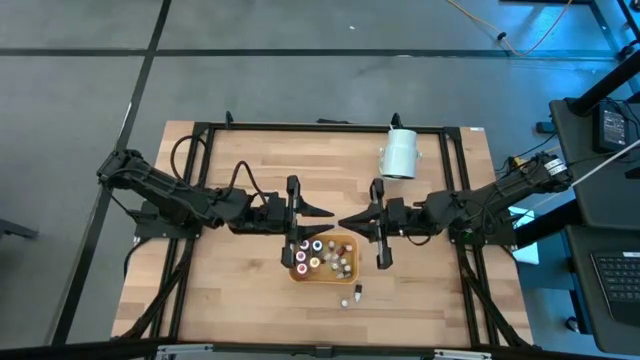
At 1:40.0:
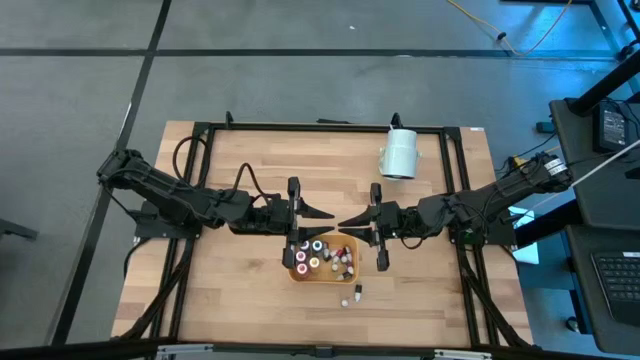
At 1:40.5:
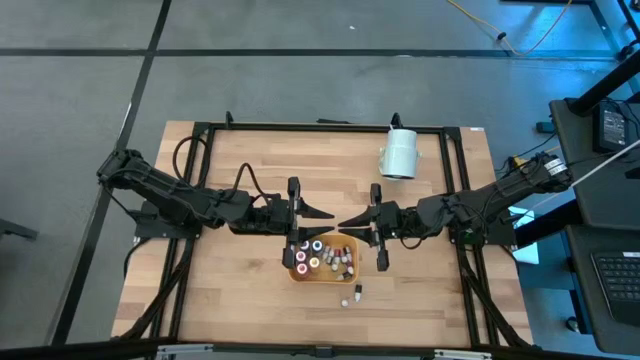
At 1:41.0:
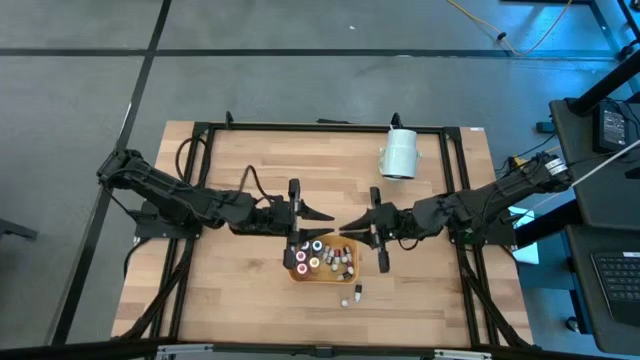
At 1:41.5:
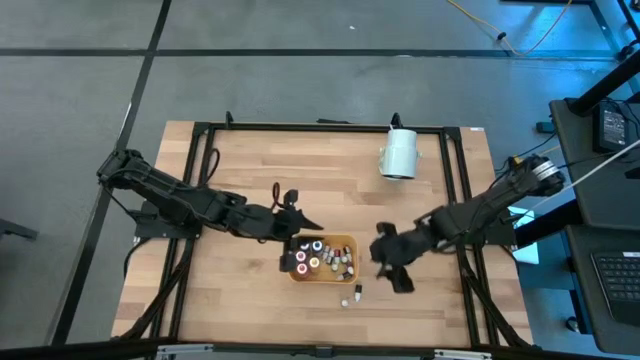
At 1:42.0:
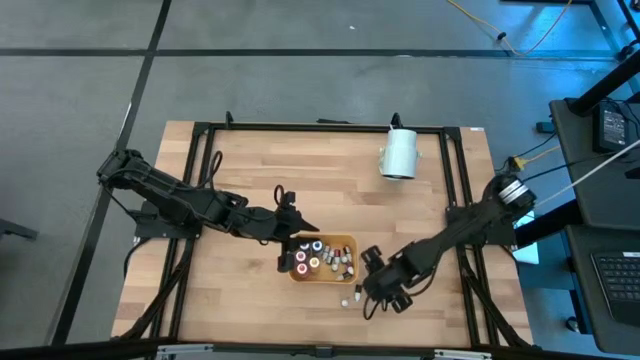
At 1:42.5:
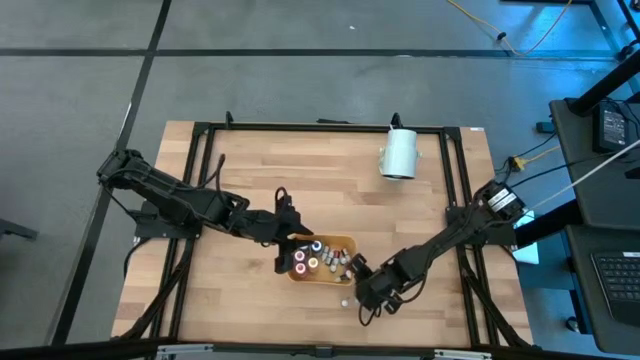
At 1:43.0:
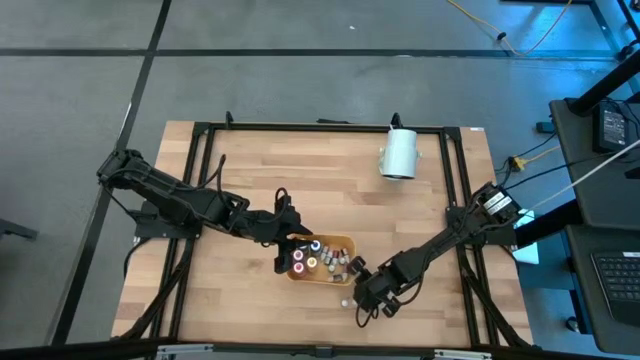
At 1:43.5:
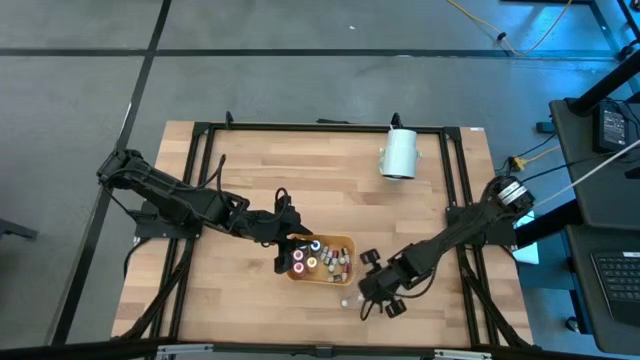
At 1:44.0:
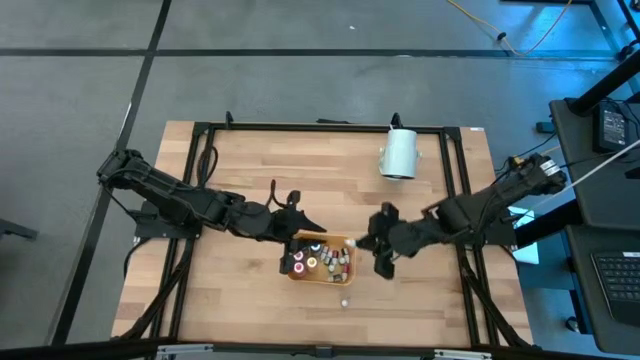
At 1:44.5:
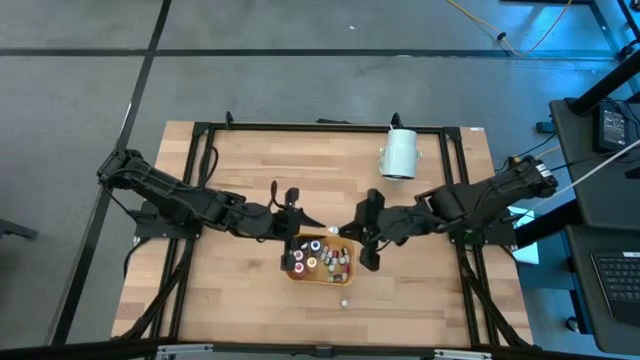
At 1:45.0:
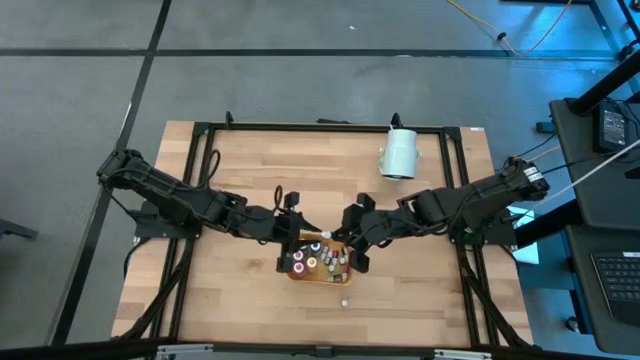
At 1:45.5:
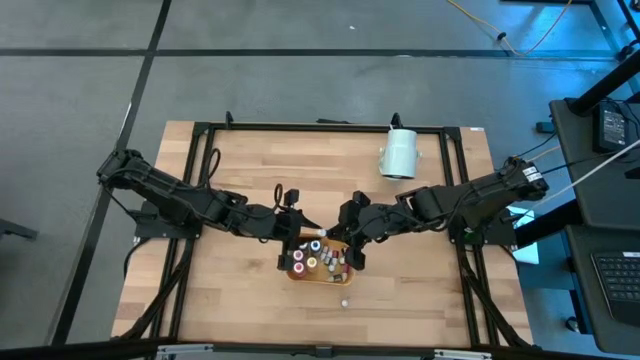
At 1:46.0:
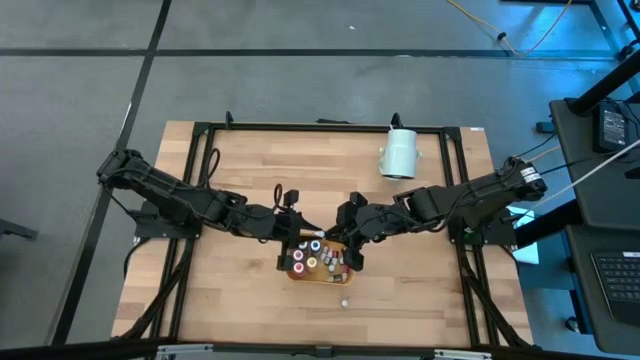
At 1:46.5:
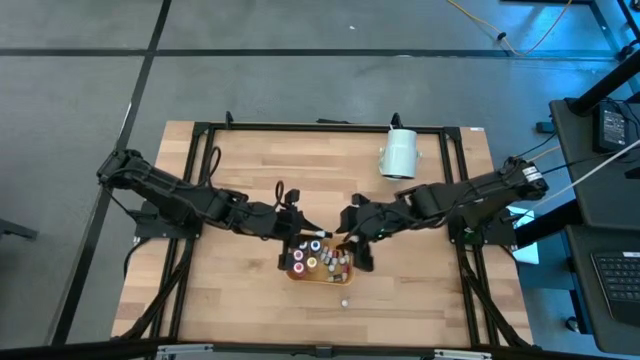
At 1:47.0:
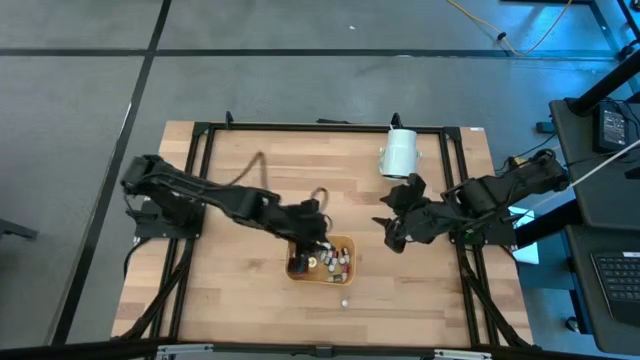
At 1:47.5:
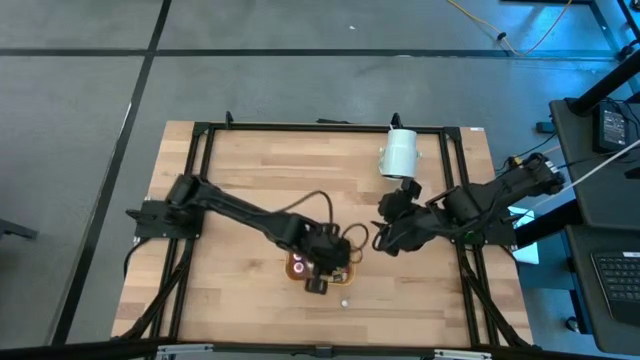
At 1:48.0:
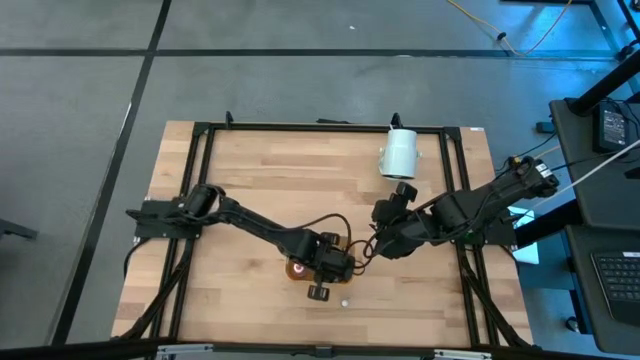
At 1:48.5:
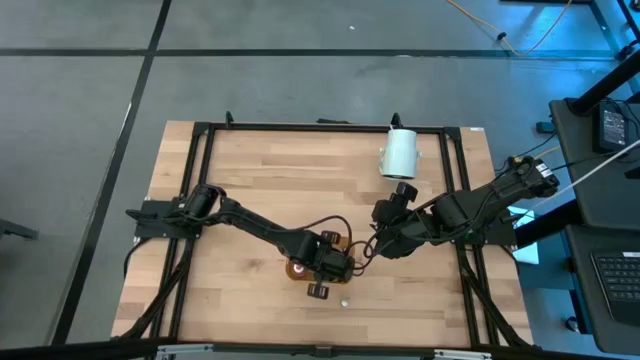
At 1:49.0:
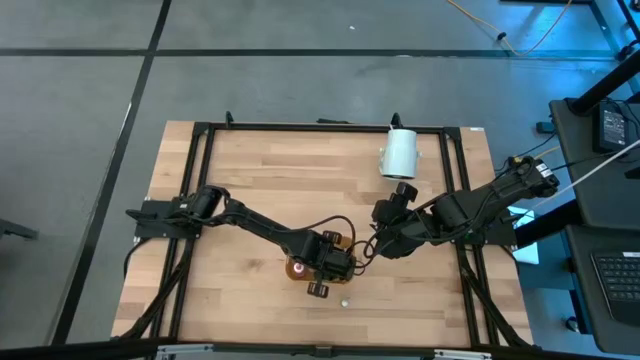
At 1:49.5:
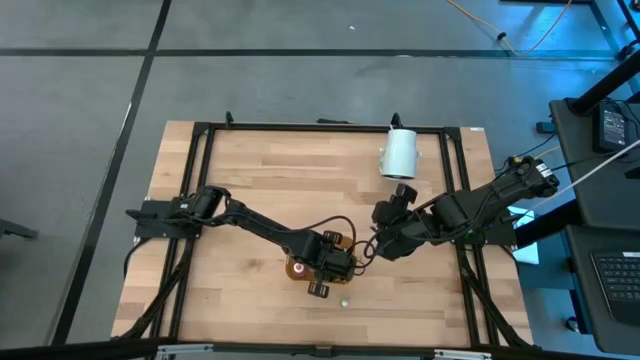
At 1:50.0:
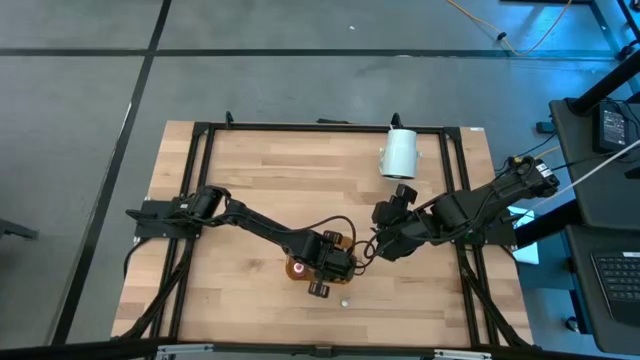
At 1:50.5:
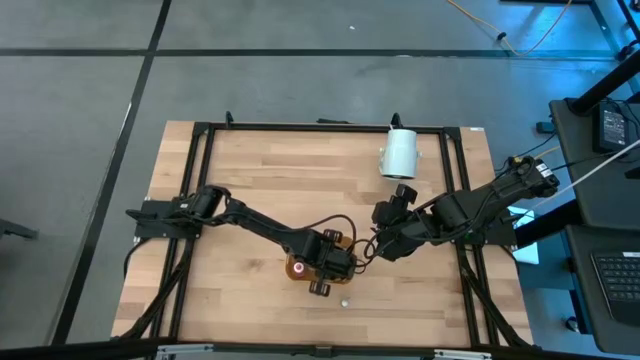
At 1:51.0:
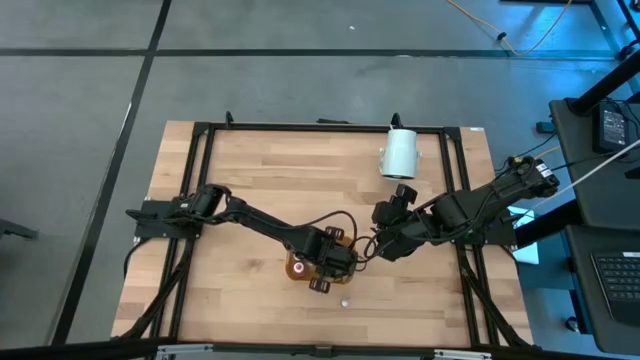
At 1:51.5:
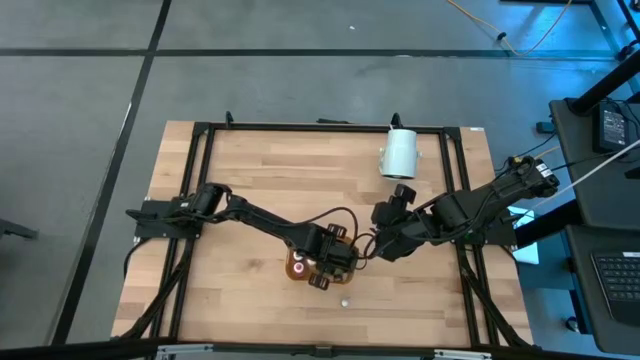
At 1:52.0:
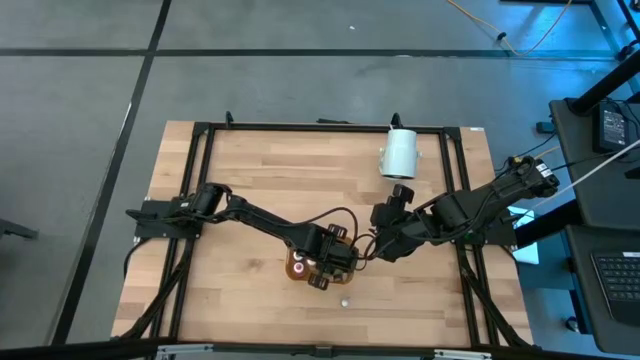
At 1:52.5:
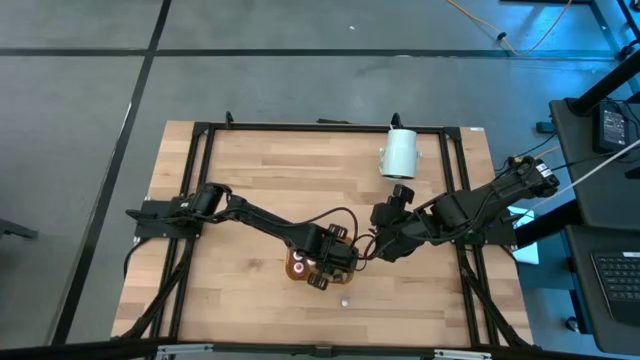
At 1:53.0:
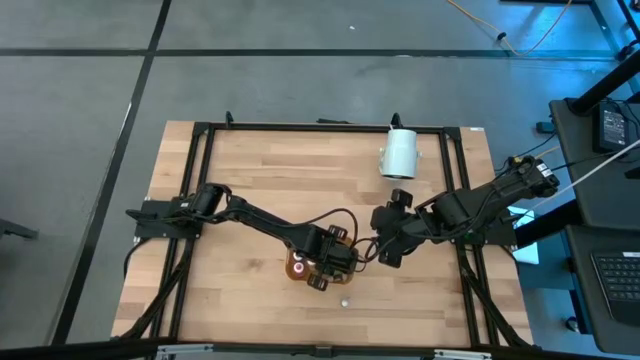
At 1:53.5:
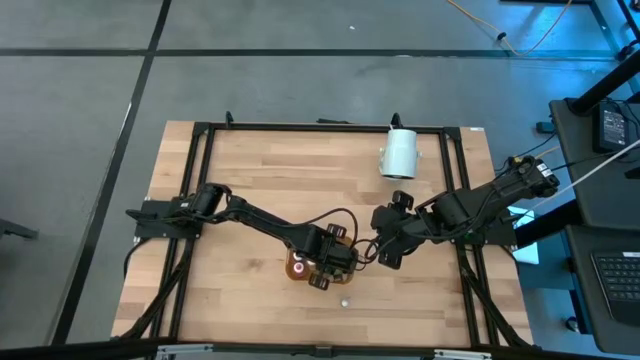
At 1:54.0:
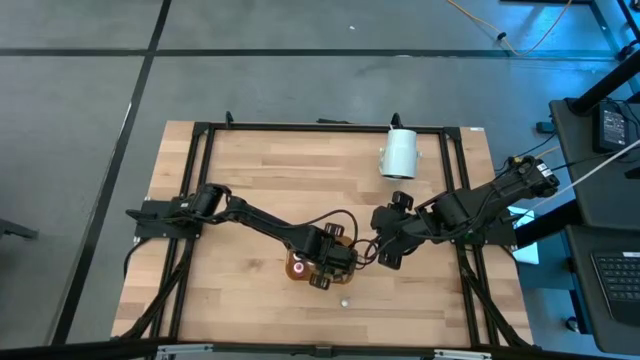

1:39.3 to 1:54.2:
Task: Pick & Place food coloring
Put the small black food coloring bottle in the yellow bin

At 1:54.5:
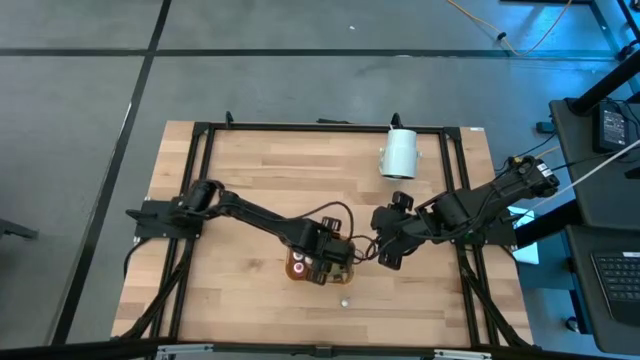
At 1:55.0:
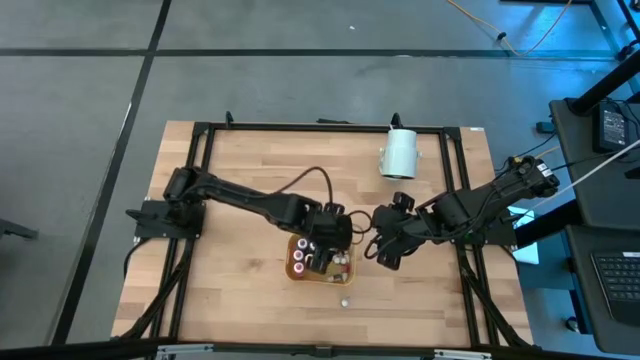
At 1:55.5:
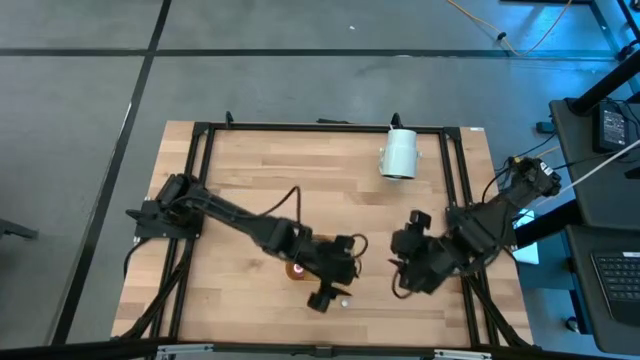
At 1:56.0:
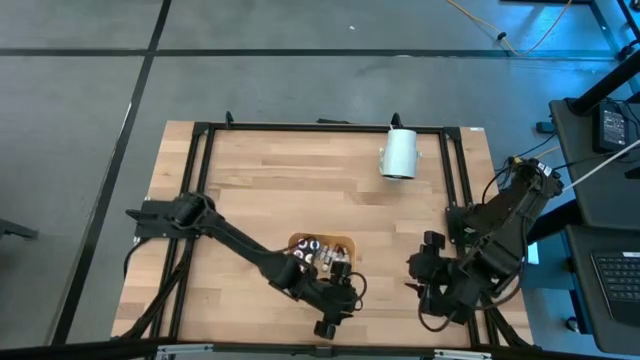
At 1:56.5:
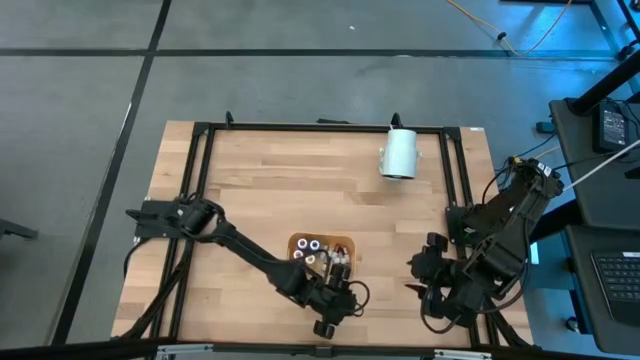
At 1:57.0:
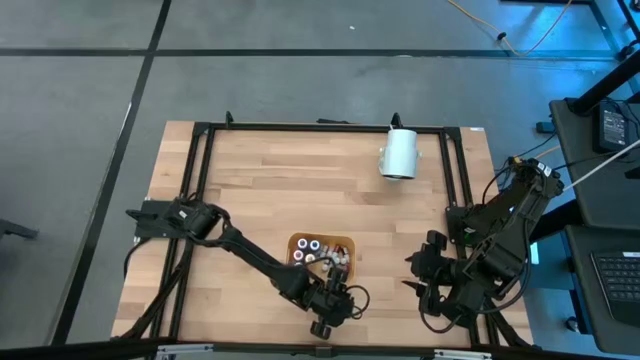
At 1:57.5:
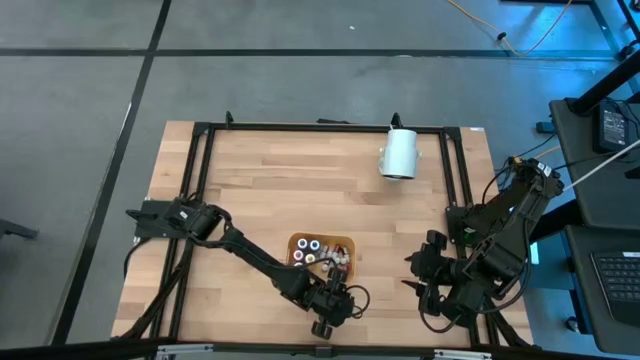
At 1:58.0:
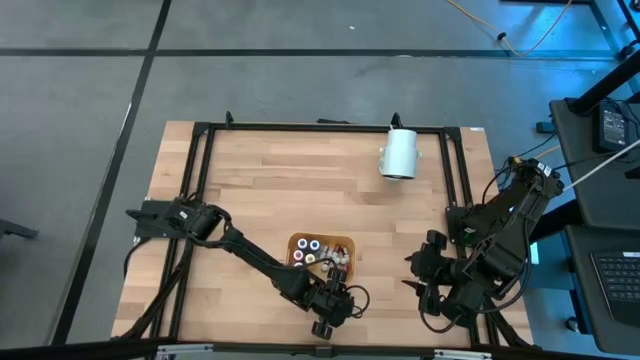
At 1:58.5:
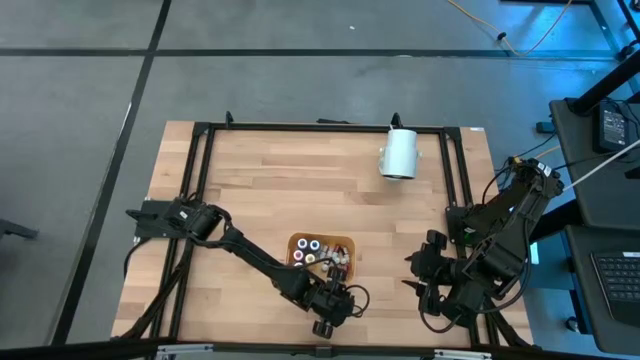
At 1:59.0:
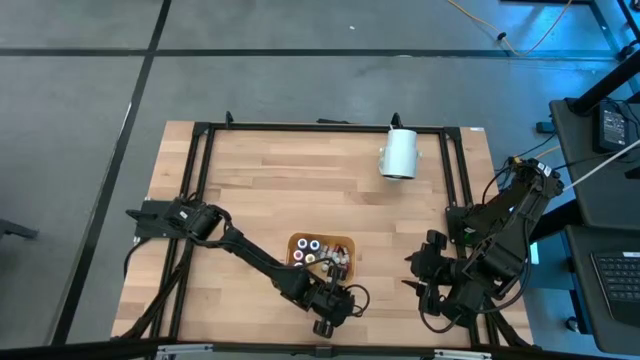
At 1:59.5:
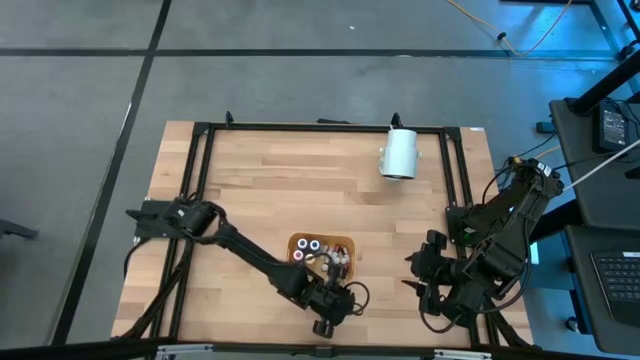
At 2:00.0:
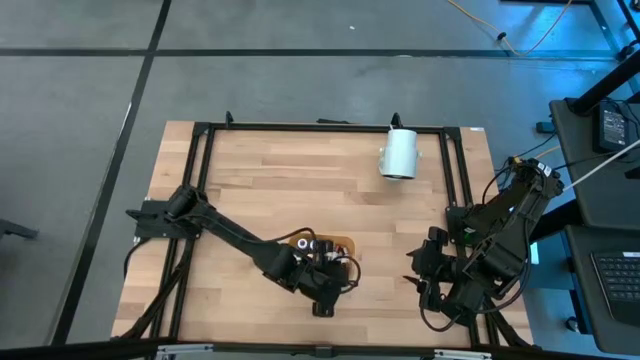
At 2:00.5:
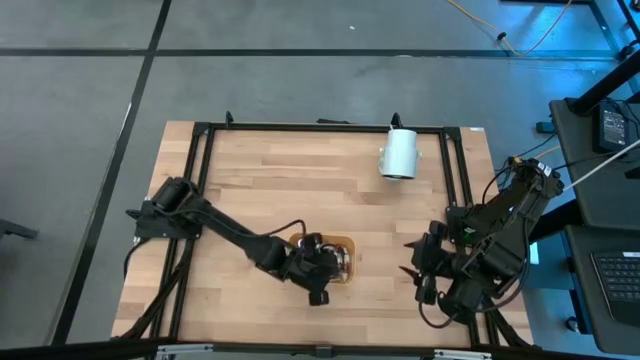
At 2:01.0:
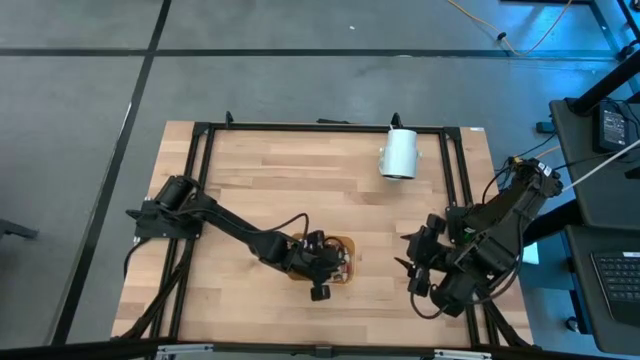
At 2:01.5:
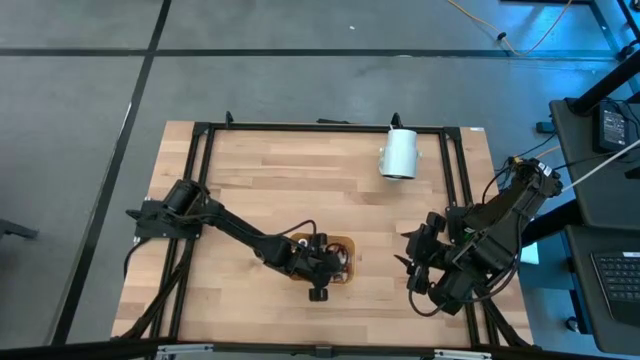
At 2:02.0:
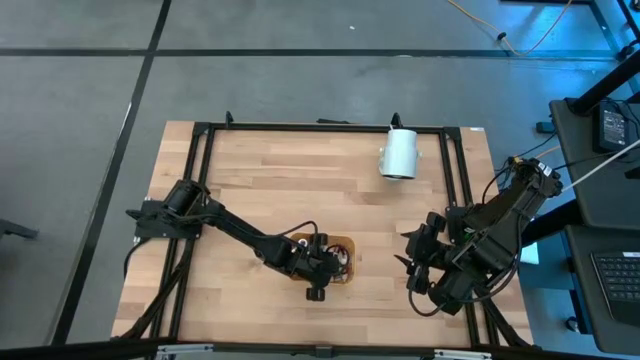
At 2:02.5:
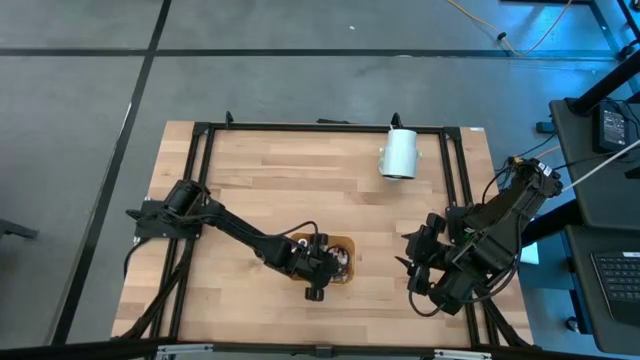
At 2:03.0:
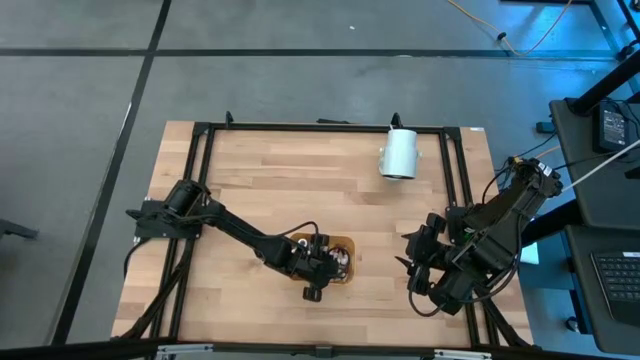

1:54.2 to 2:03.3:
Put the small dark green food coloring bottle in the yellow bin
